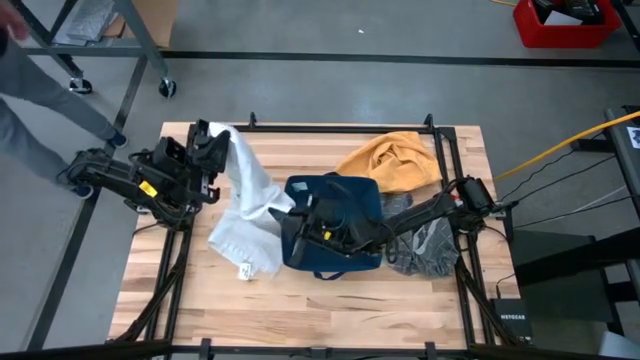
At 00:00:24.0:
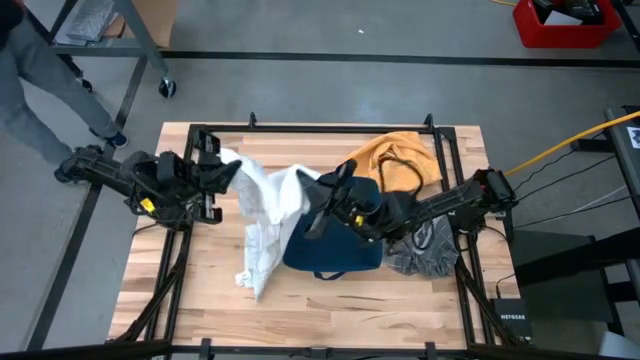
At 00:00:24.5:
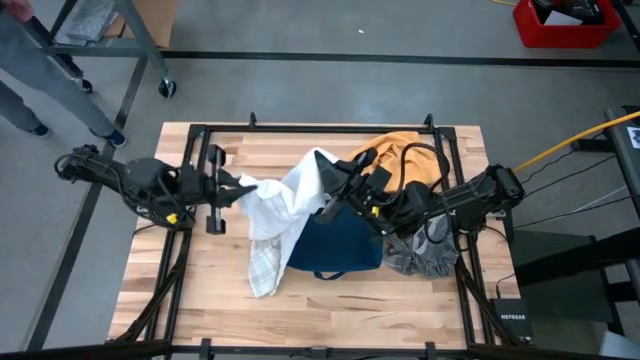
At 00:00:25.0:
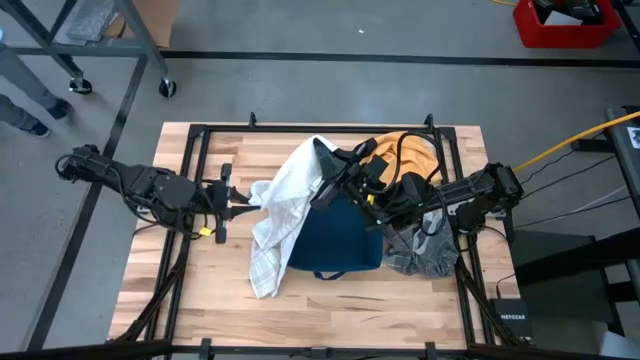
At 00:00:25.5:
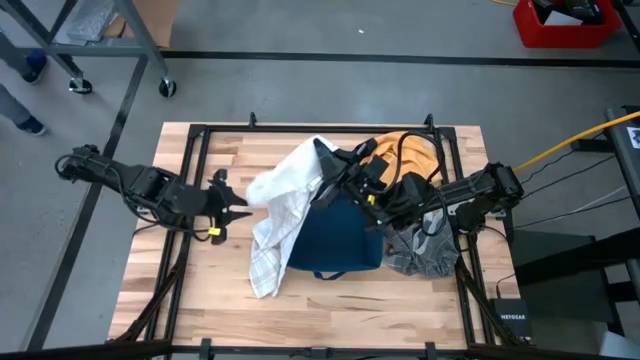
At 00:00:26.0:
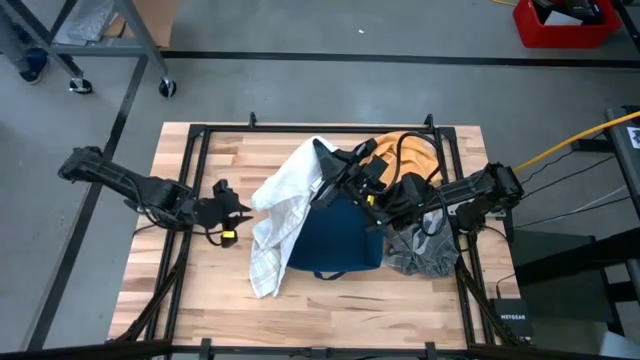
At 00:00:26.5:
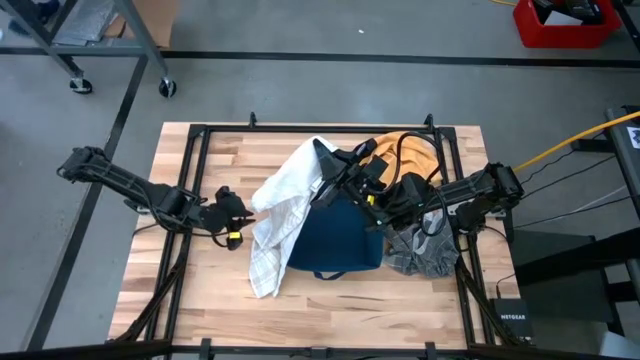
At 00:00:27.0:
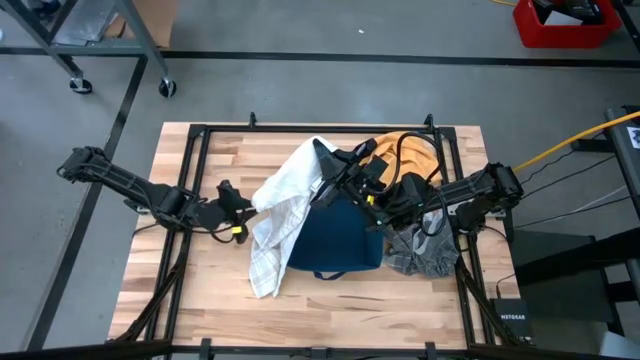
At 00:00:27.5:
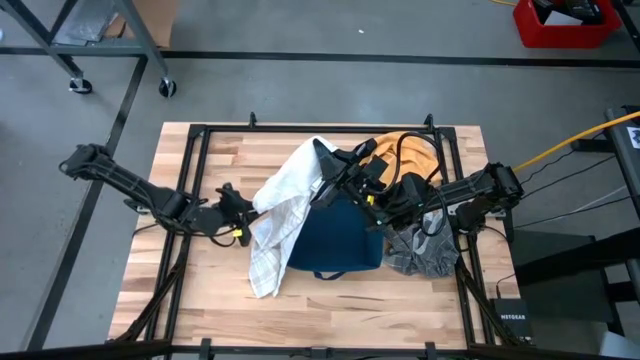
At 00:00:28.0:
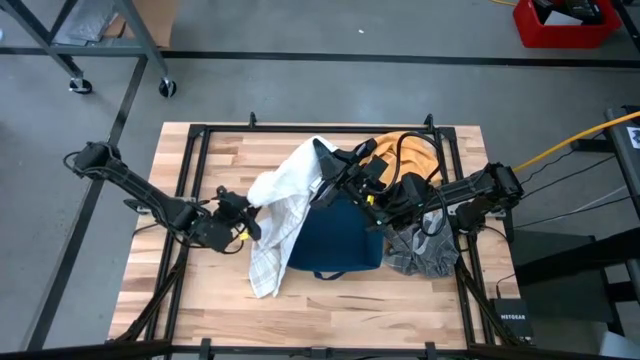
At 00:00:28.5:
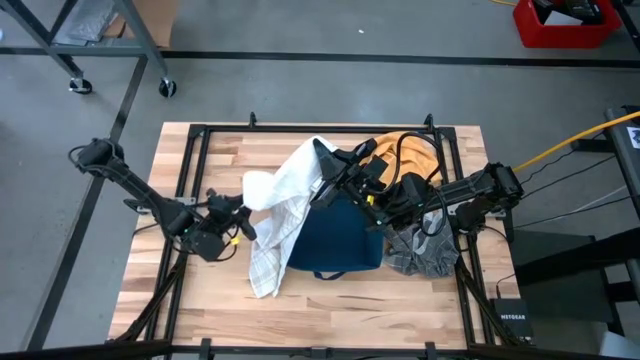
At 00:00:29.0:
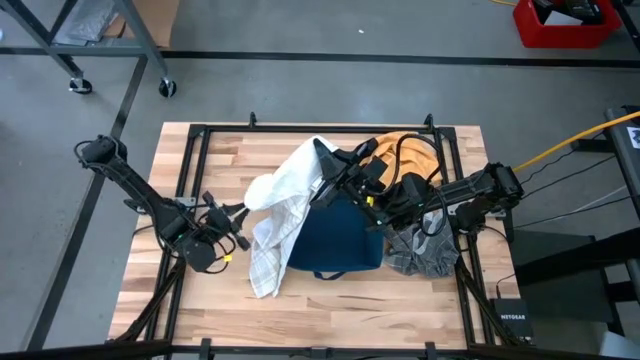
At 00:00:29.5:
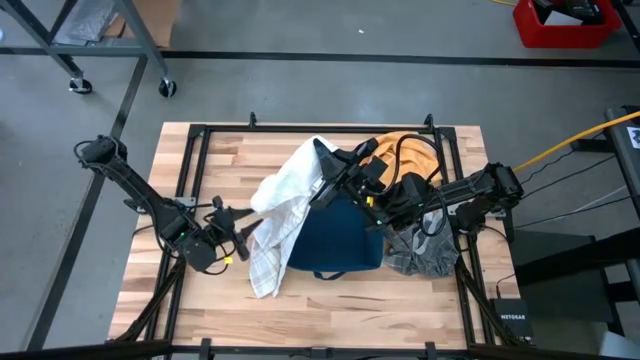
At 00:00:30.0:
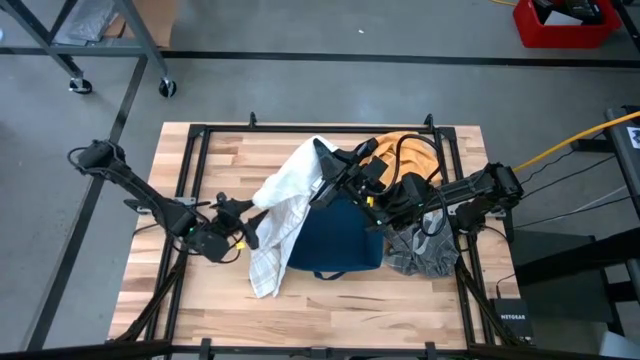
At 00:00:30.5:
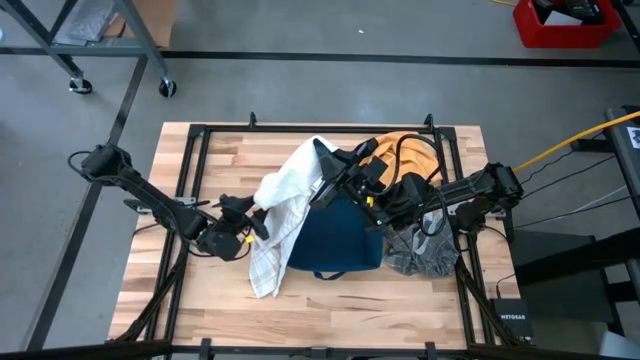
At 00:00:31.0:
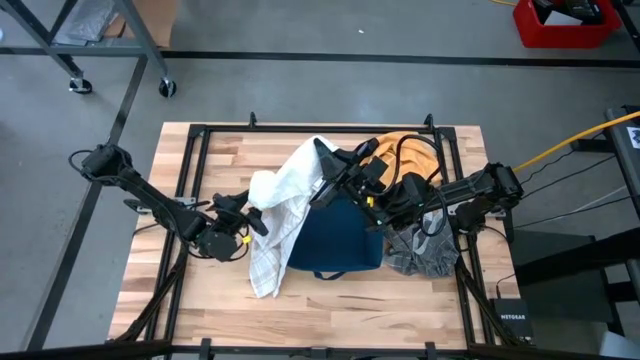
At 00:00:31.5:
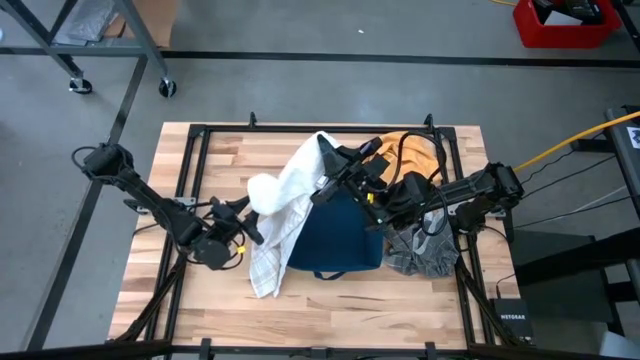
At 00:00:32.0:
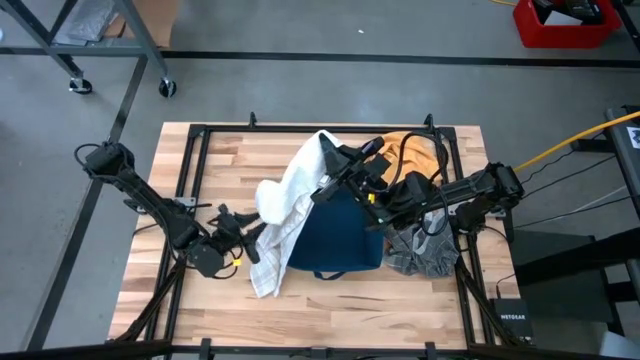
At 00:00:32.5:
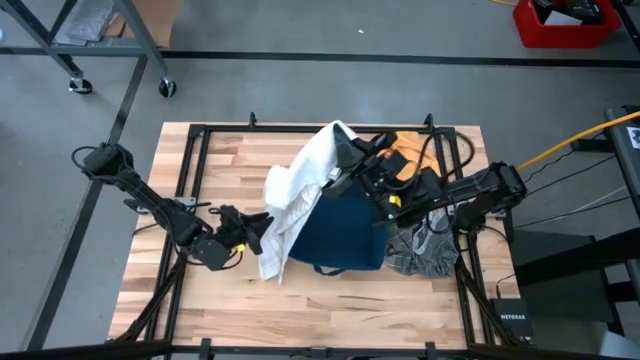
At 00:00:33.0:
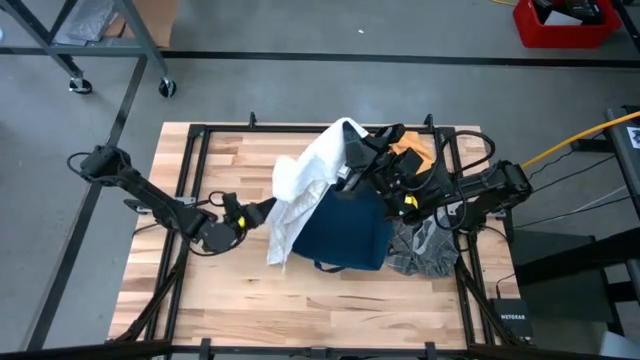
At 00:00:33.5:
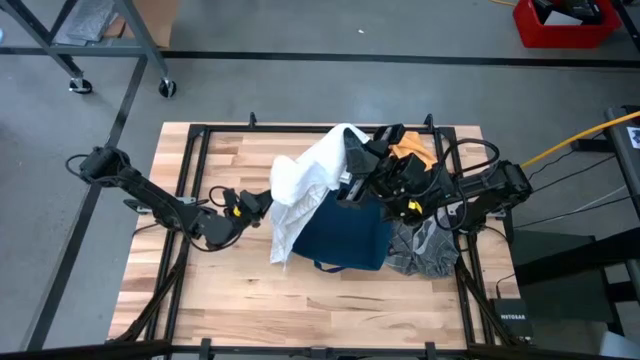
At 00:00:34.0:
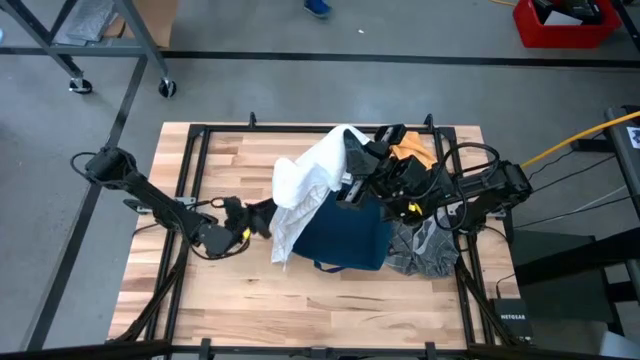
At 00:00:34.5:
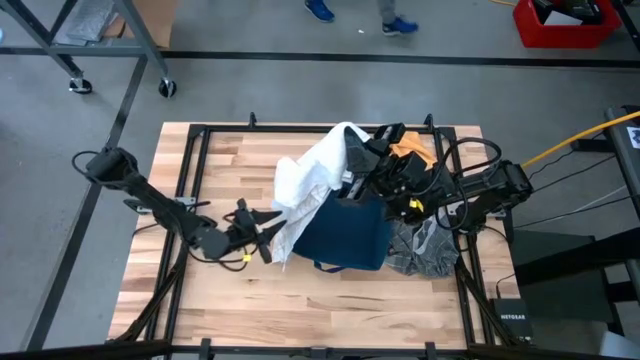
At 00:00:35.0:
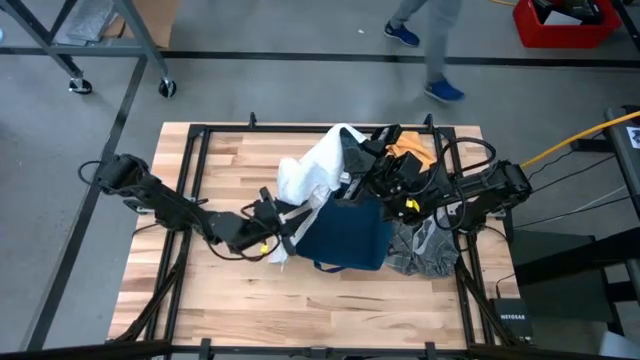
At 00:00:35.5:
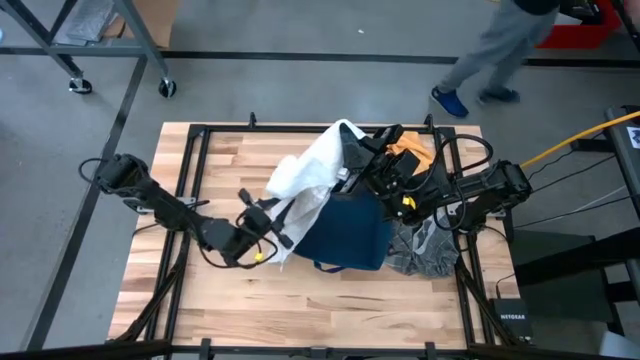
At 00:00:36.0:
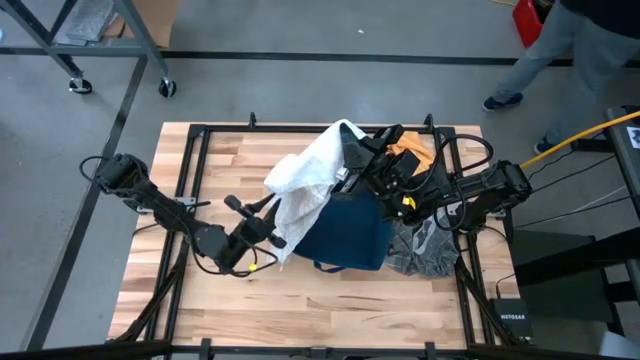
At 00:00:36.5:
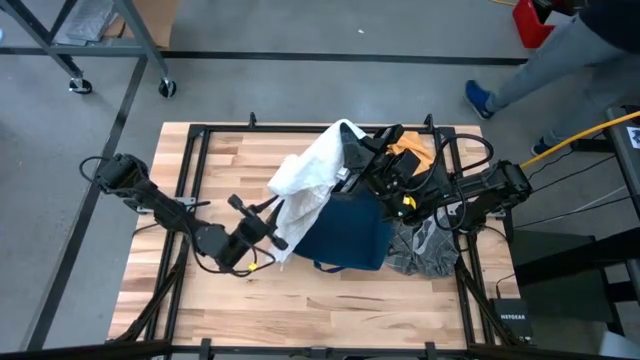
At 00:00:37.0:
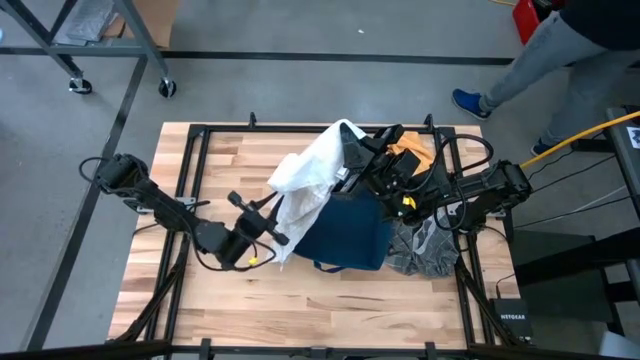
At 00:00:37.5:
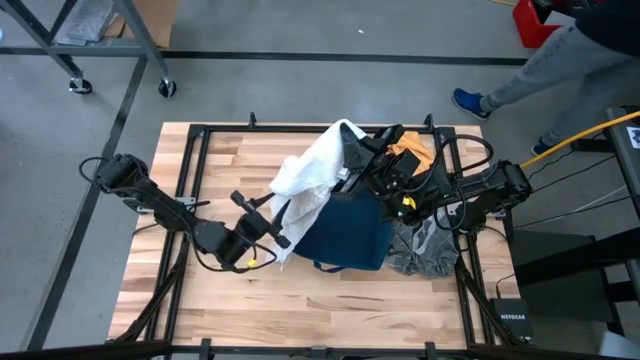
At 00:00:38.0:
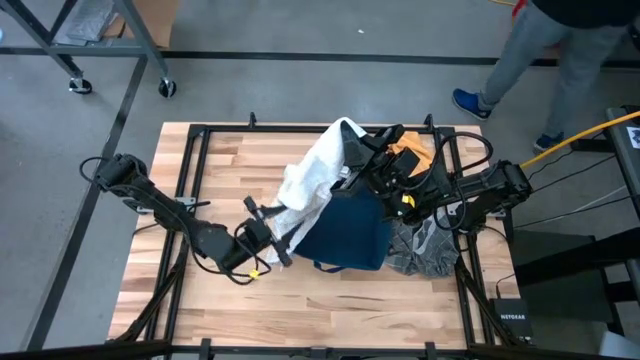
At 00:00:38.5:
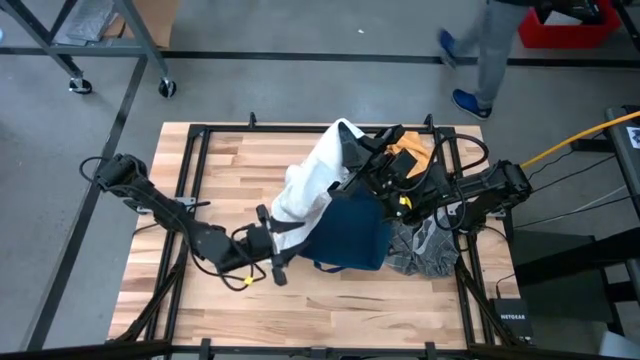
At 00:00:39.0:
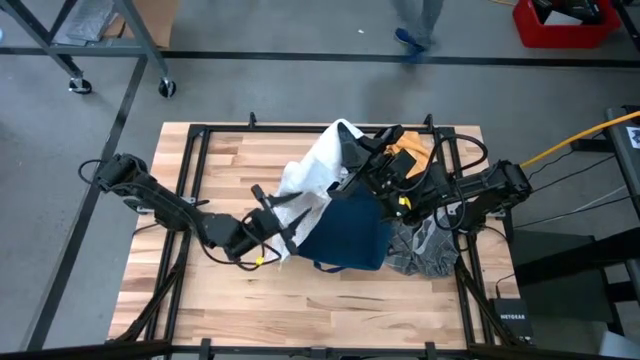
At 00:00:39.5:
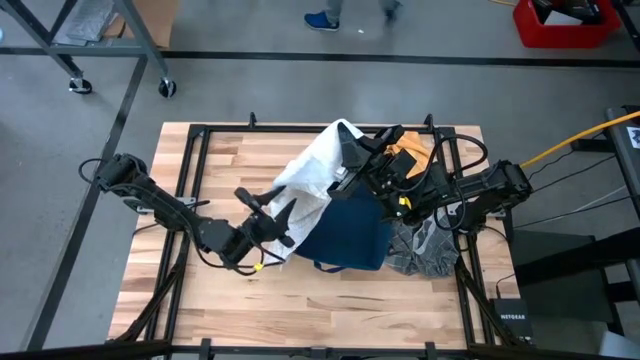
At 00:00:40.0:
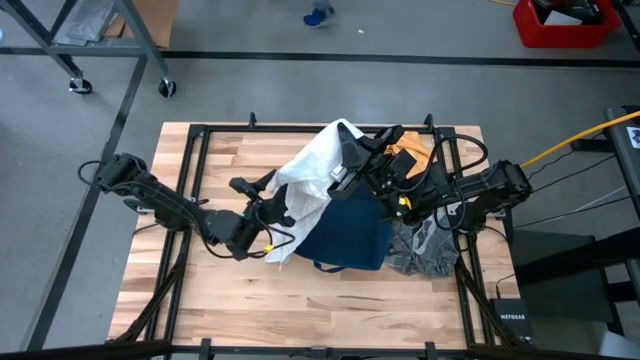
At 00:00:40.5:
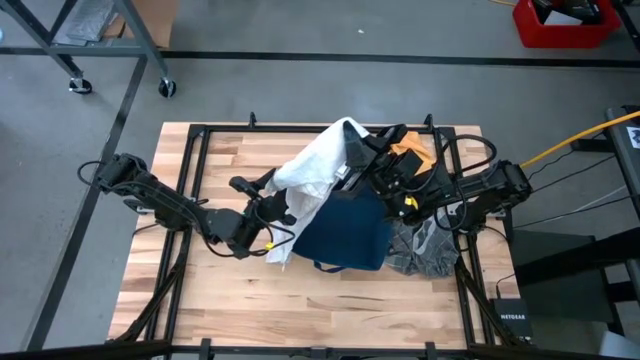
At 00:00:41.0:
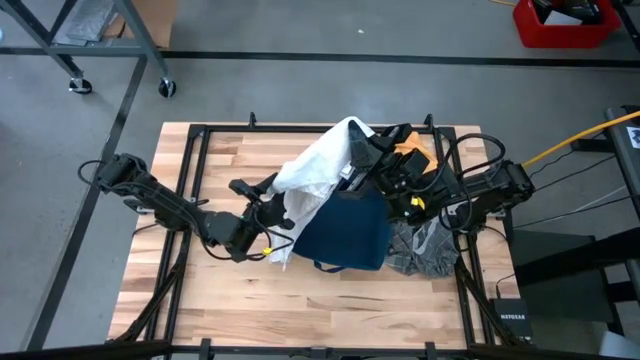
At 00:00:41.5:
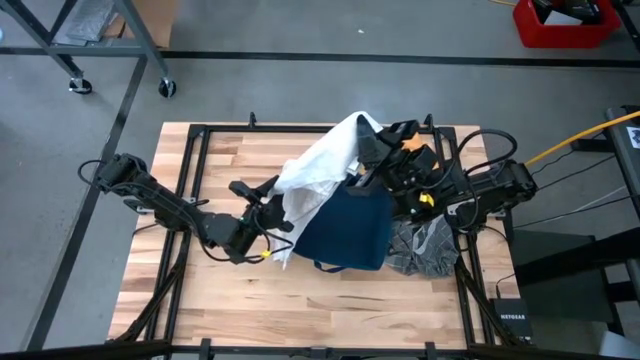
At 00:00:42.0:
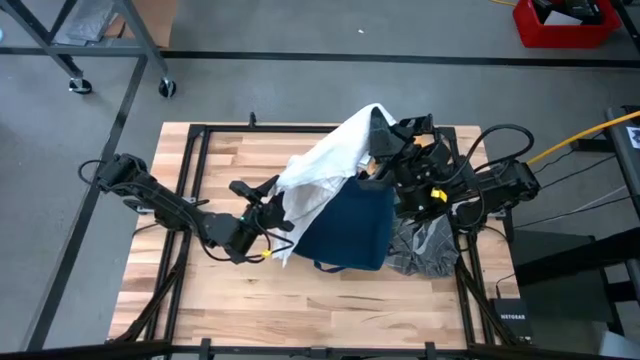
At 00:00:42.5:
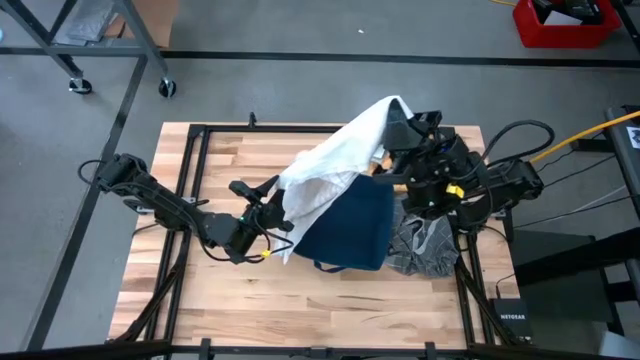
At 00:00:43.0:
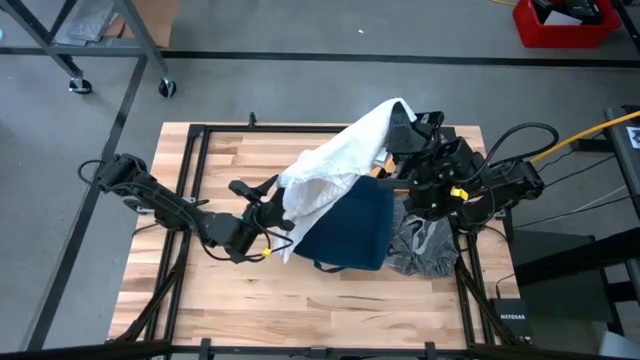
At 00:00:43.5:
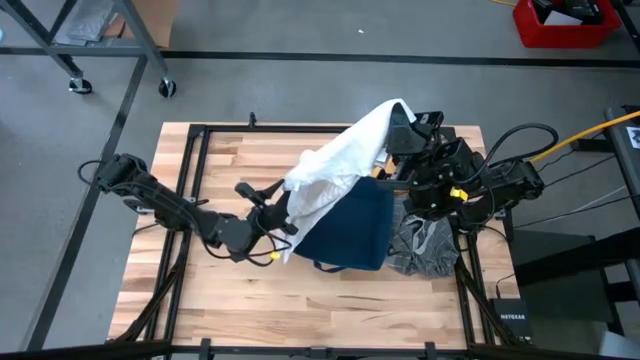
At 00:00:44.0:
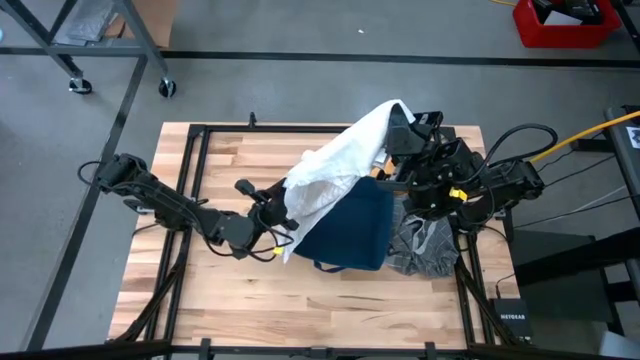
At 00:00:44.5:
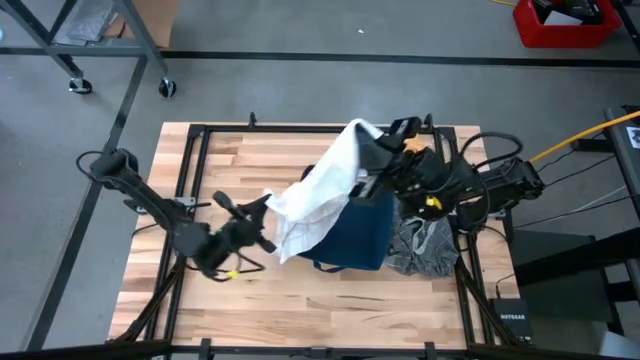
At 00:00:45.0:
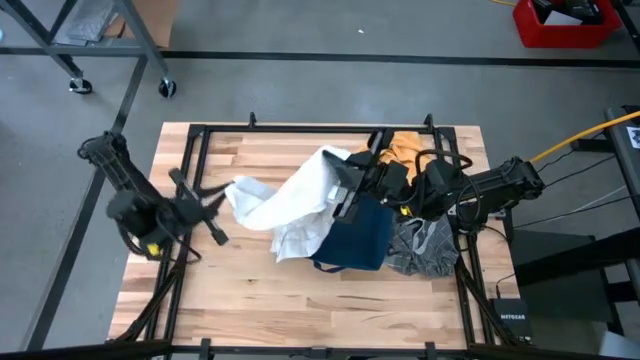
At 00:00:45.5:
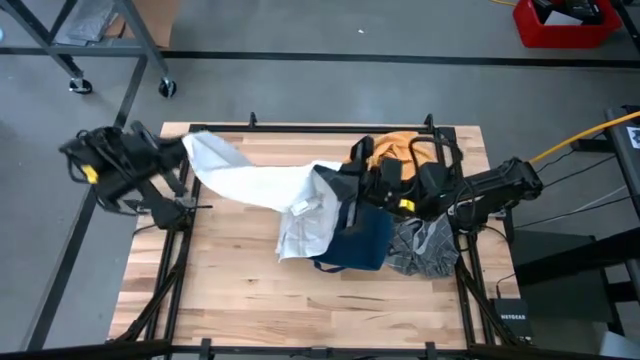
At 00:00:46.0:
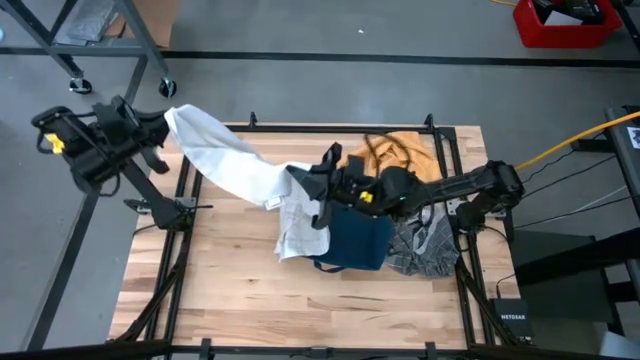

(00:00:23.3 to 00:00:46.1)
Task: Fold towel
Fold the white patterned towel
